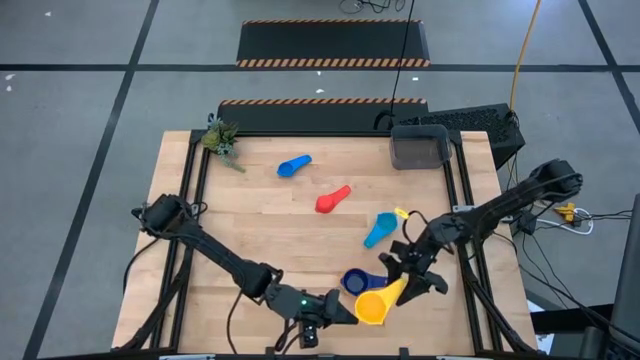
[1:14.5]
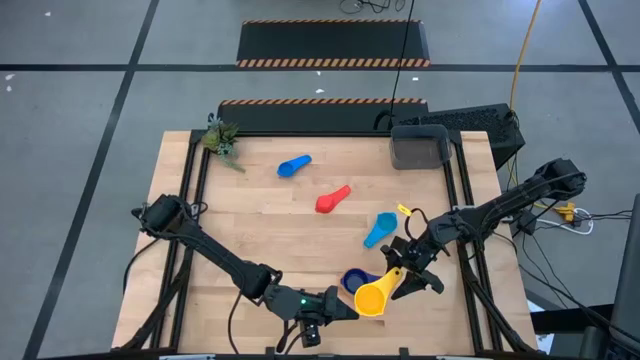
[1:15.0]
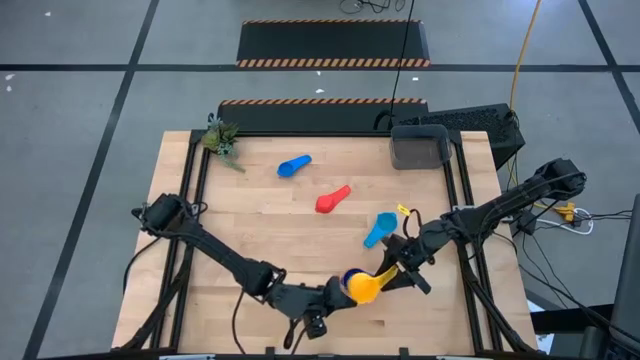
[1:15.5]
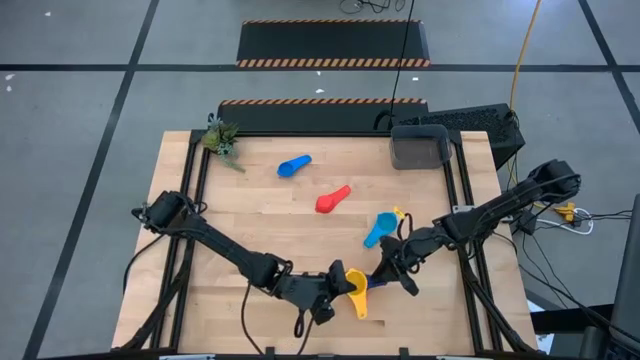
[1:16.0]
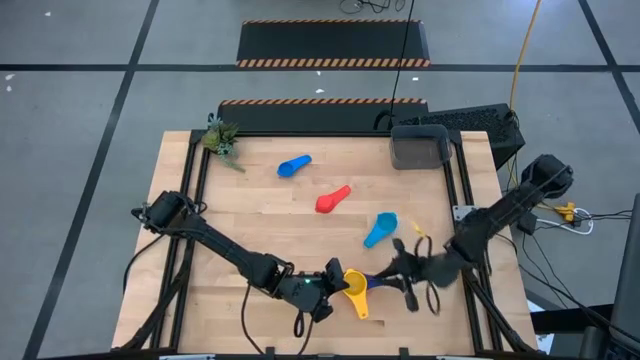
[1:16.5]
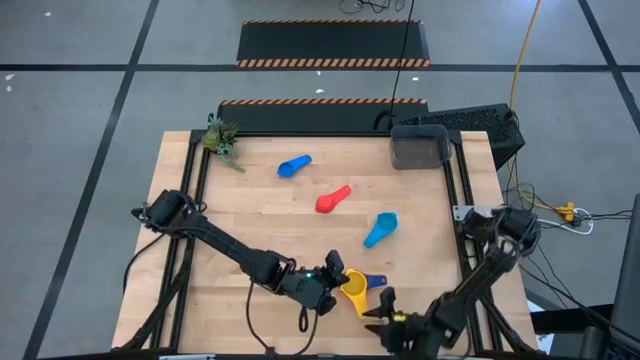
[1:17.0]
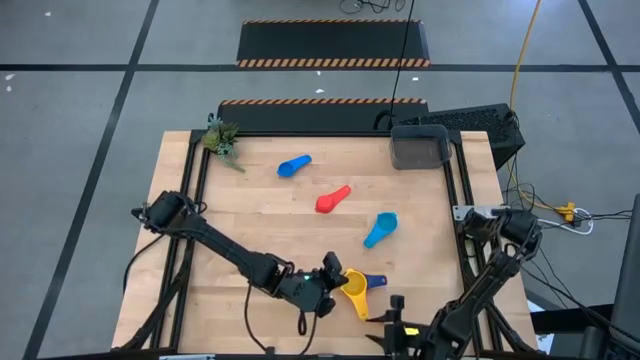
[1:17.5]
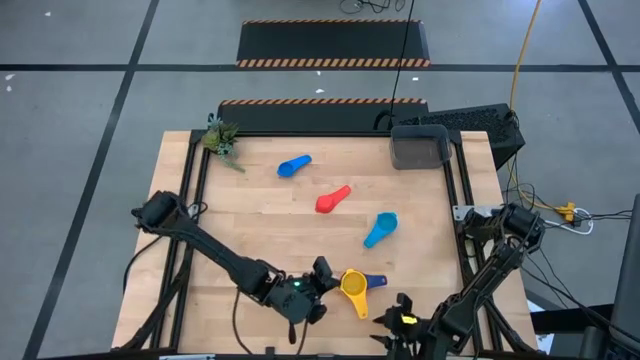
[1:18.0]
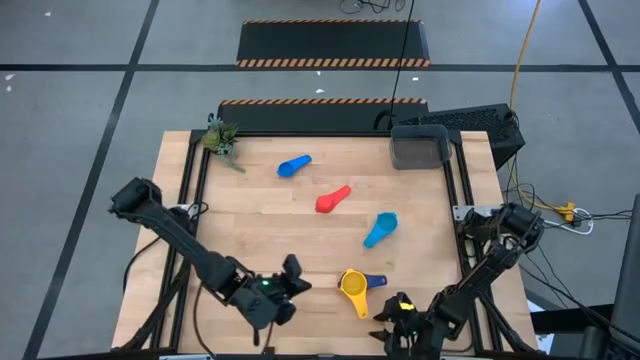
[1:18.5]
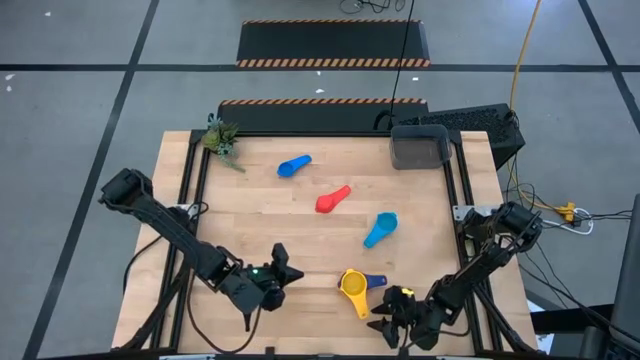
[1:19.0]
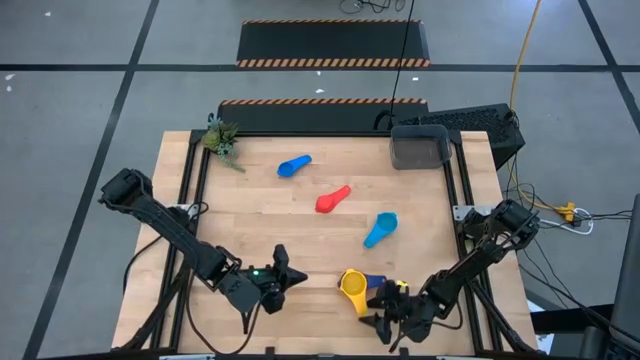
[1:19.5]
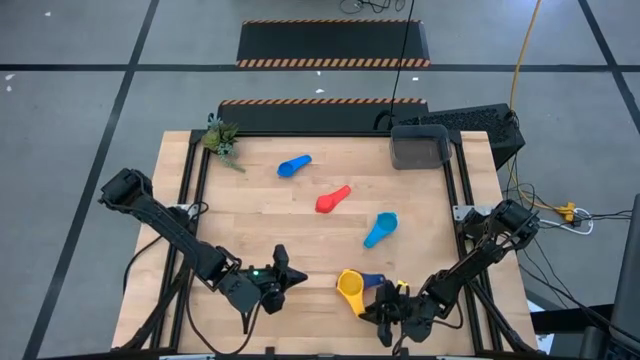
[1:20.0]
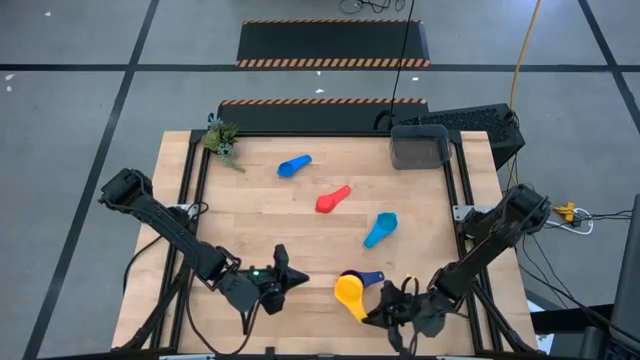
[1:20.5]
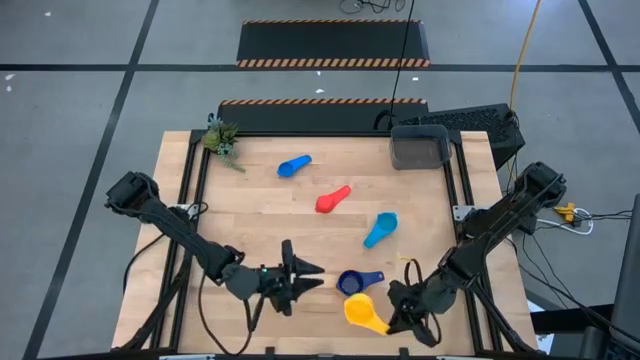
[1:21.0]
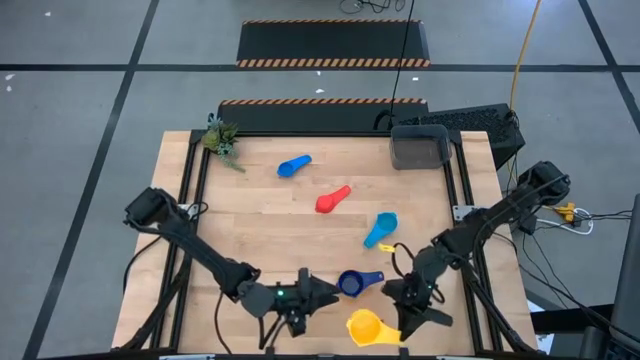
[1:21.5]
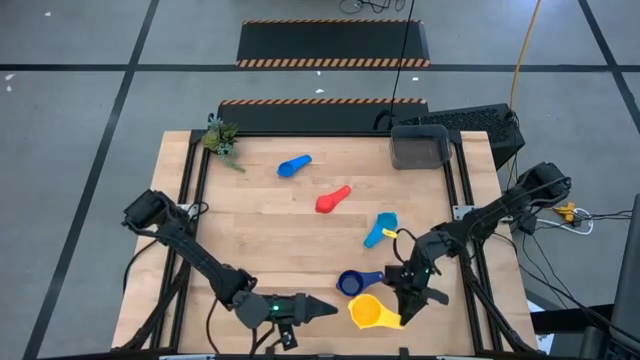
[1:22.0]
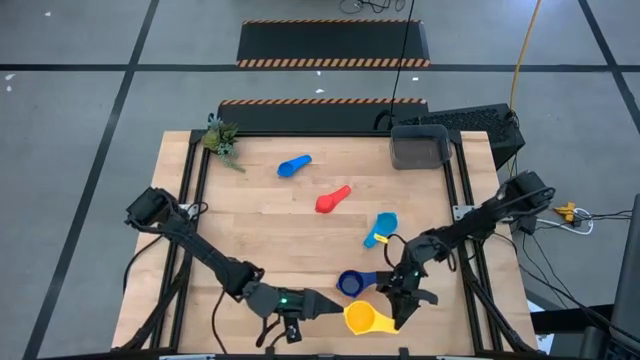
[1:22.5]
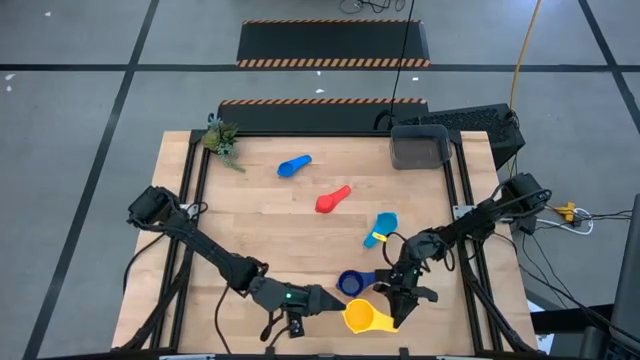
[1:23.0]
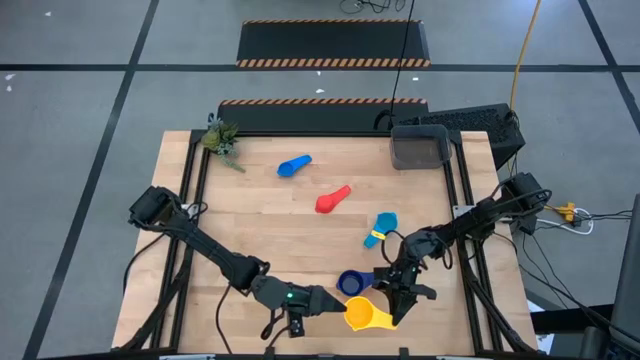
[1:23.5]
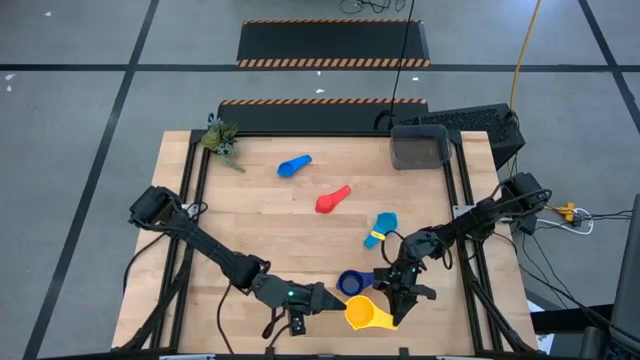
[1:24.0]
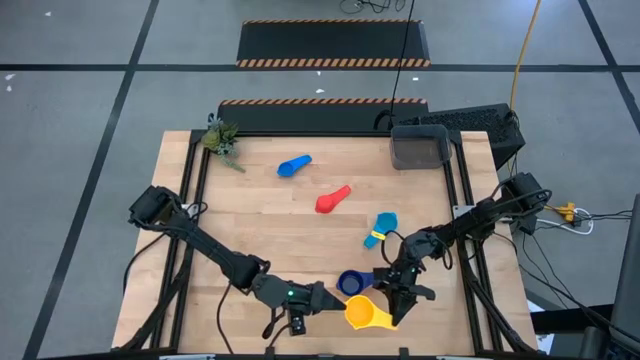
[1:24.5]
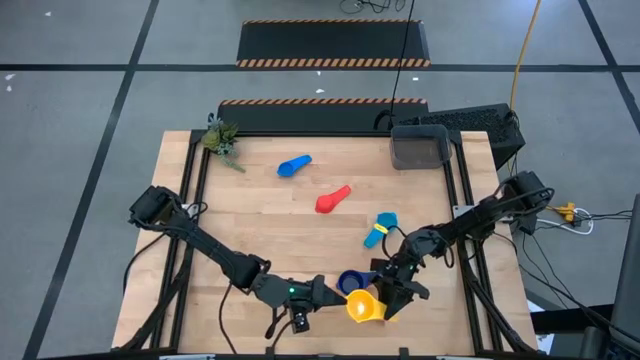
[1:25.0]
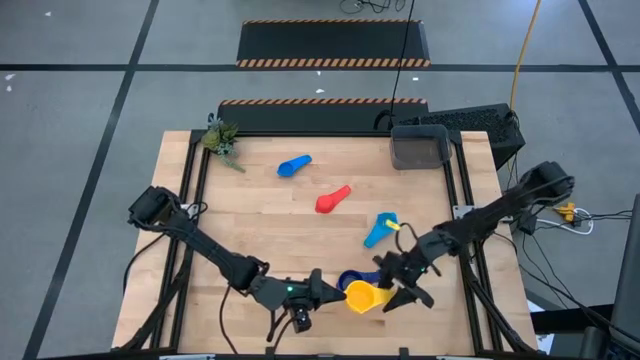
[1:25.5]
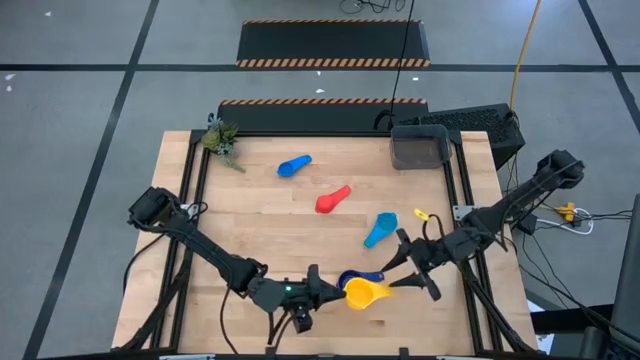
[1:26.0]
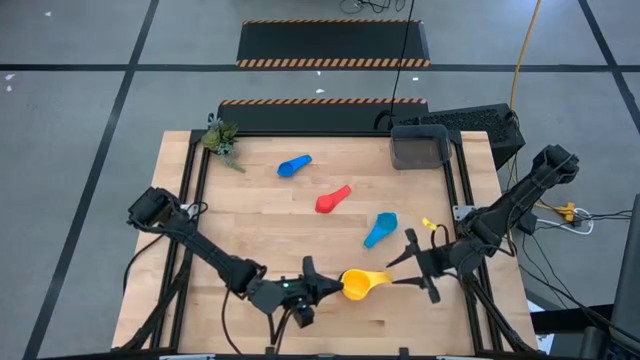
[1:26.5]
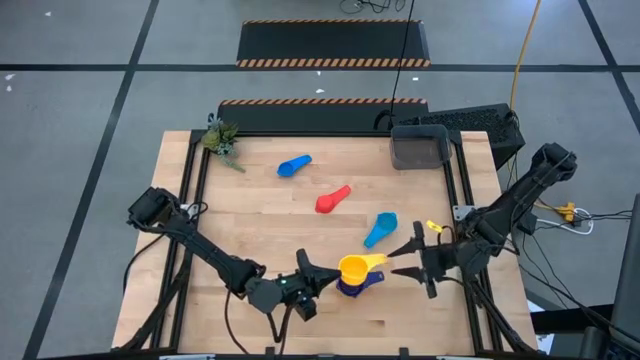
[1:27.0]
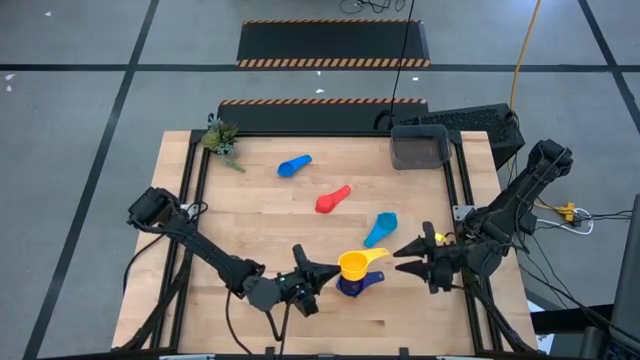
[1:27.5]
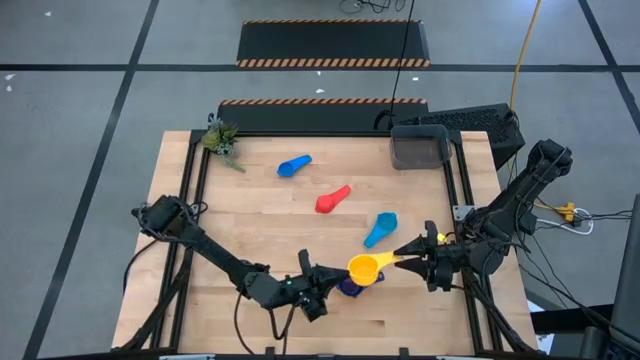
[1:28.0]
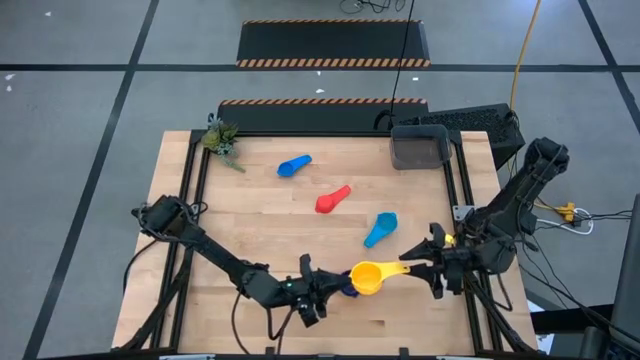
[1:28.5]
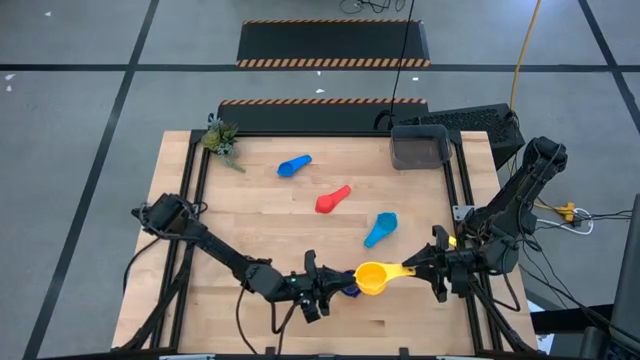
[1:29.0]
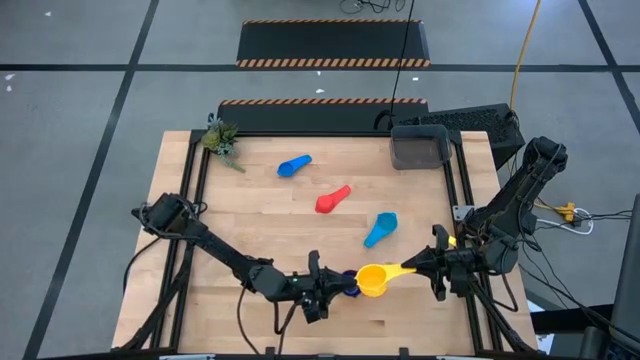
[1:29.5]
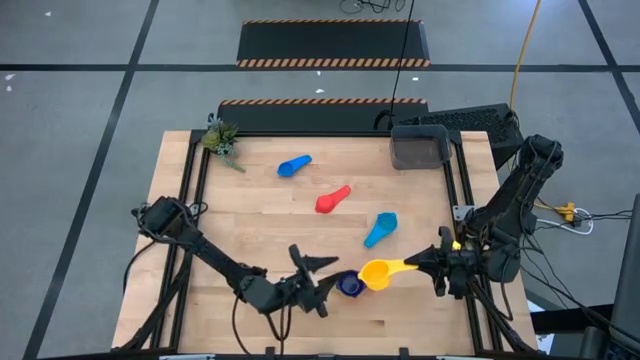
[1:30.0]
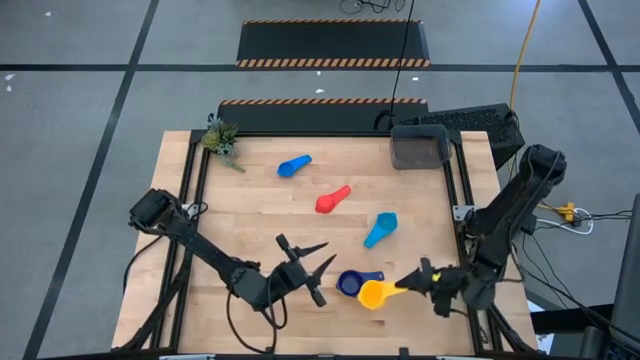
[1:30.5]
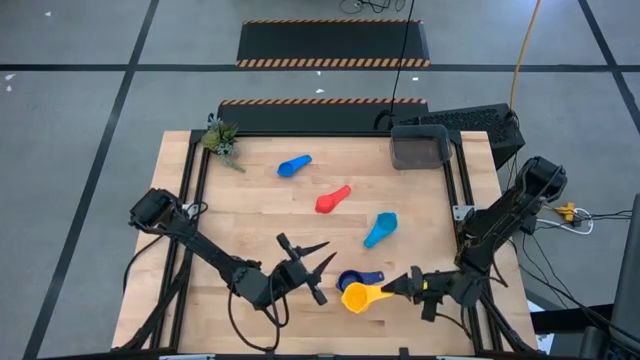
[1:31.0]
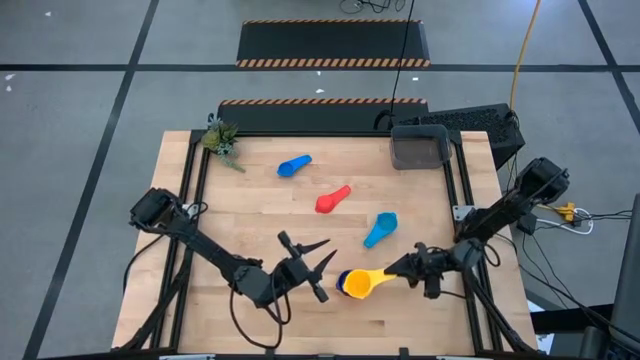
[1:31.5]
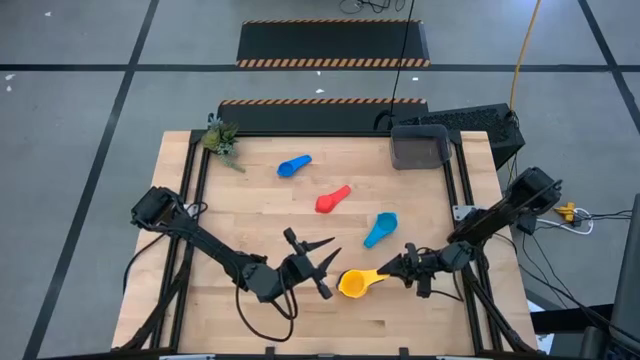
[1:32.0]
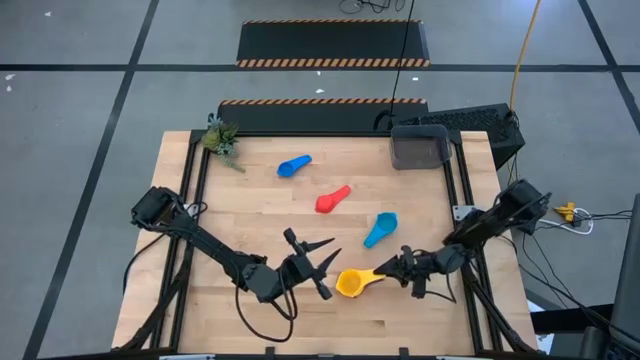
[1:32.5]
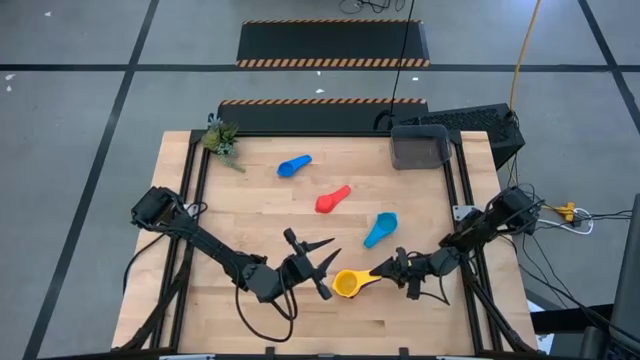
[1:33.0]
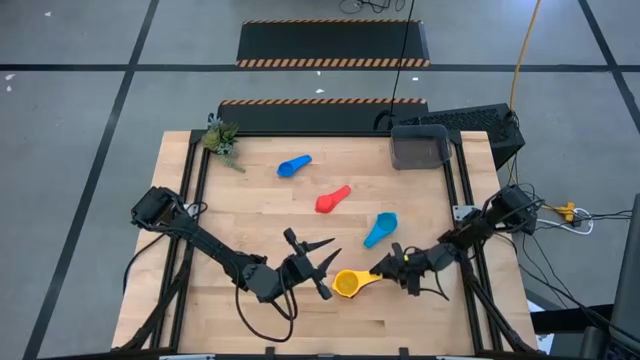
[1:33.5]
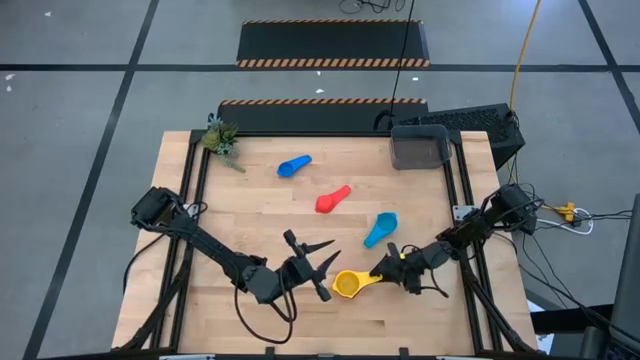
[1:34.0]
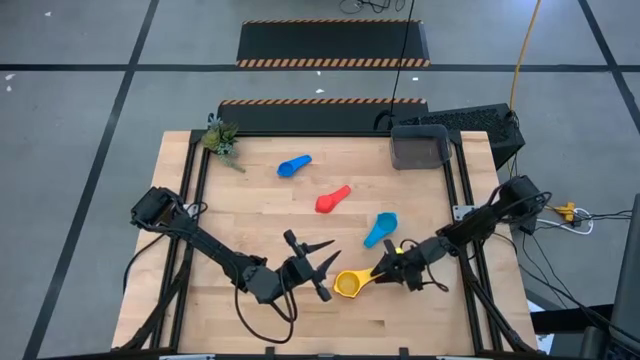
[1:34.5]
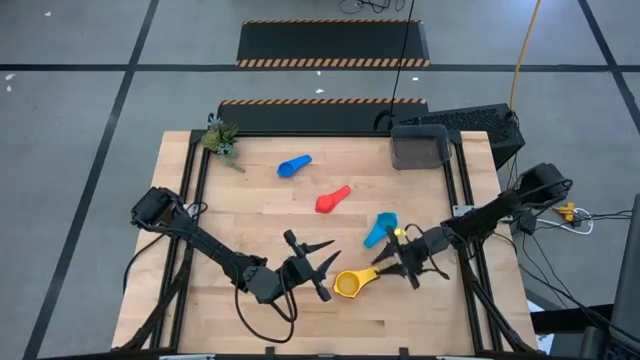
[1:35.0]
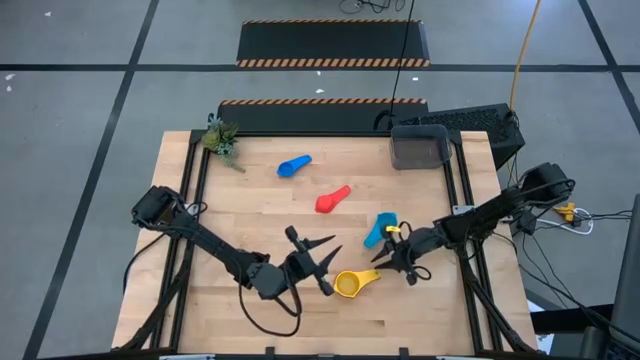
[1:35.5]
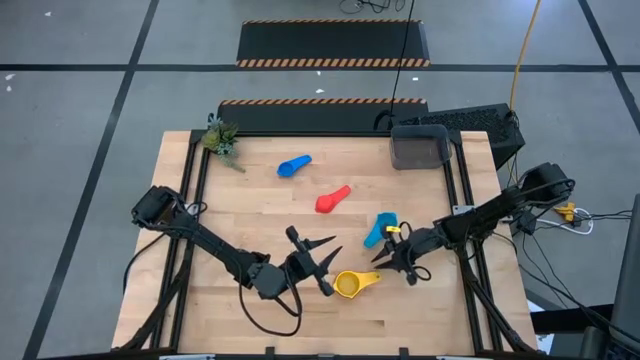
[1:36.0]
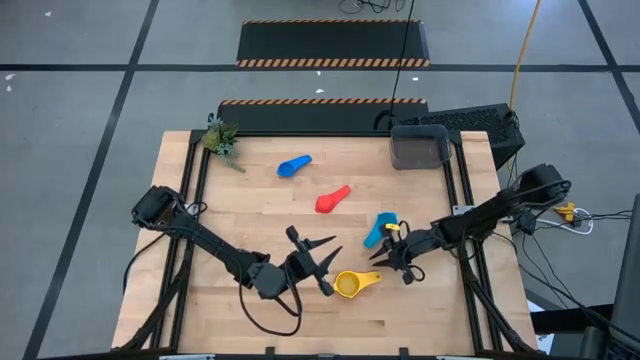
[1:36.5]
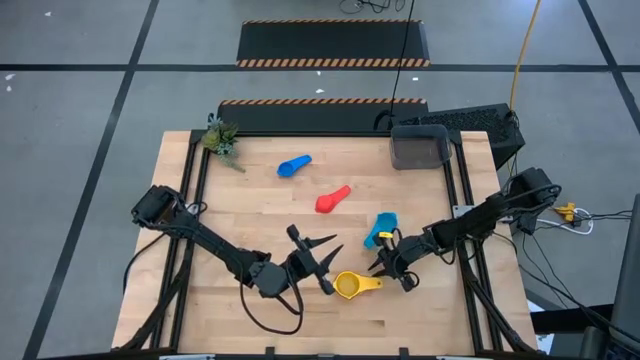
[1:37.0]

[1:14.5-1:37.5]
Task: Nest measuring cups in basket
Stack the yellow measuring cup on top of the dark blue measuring cup
